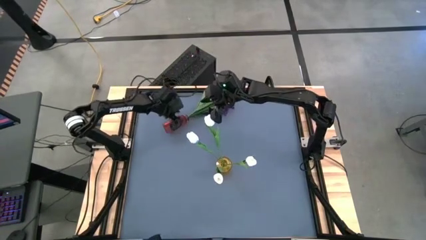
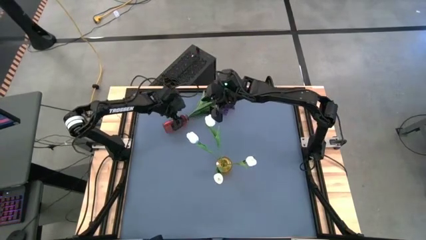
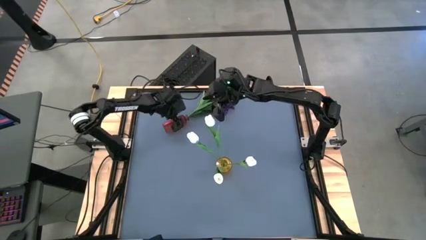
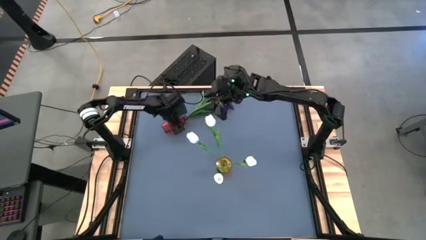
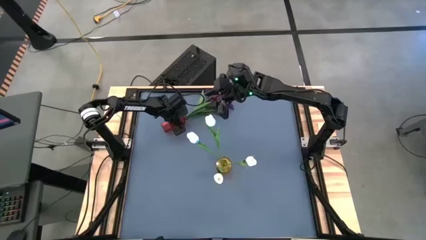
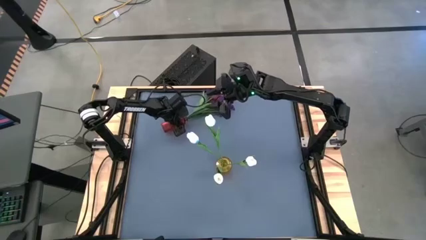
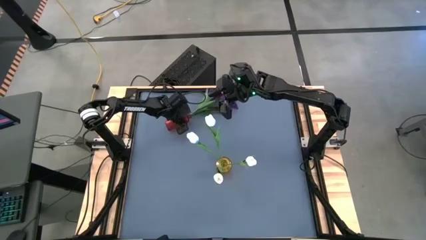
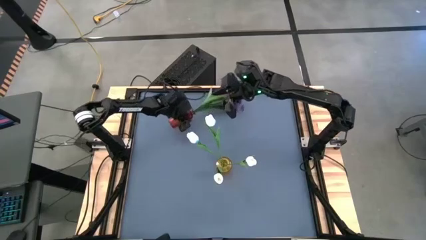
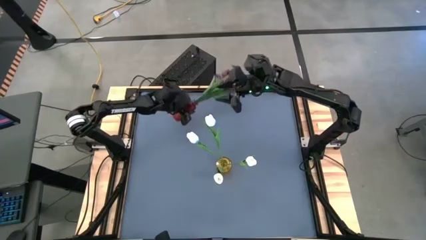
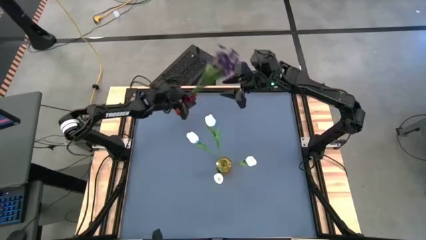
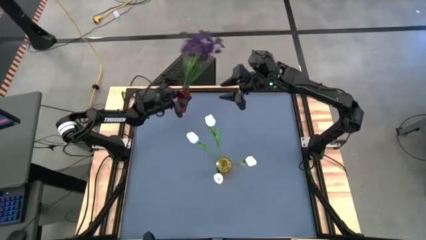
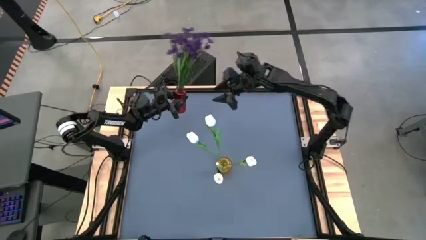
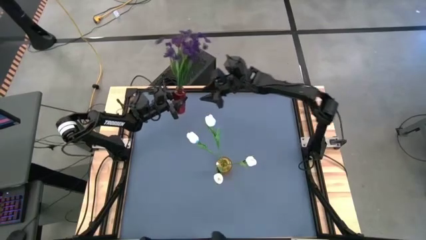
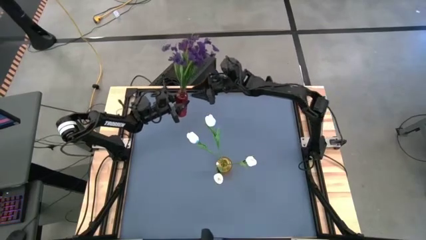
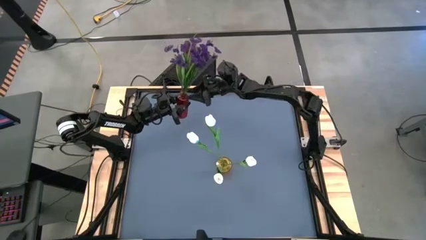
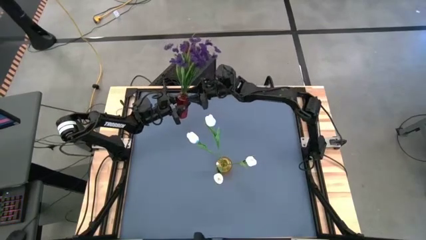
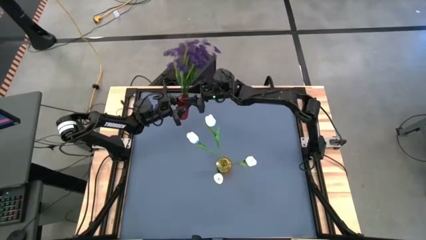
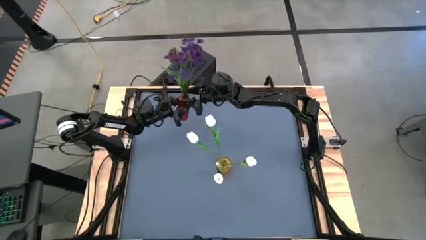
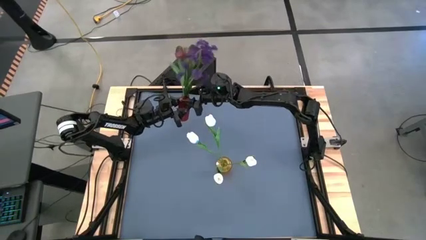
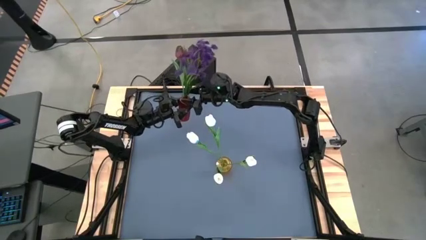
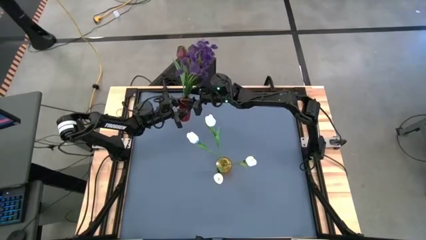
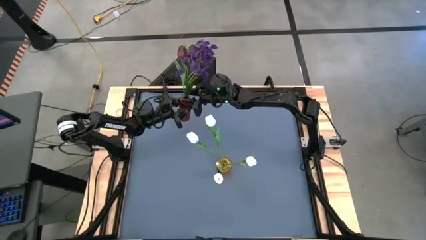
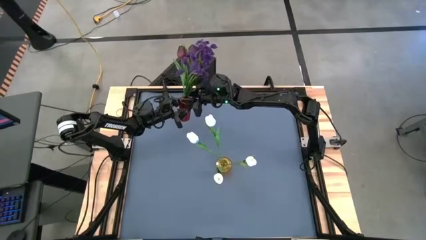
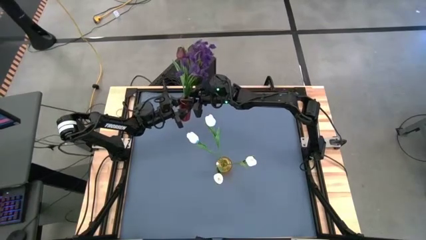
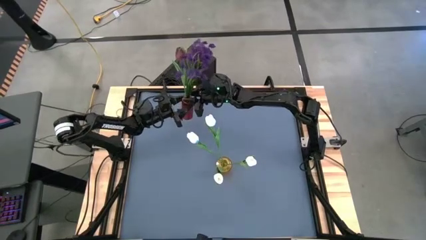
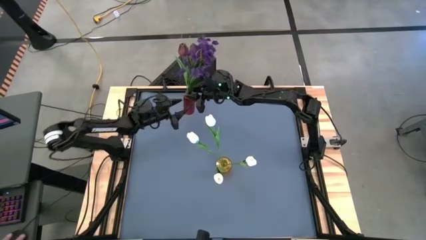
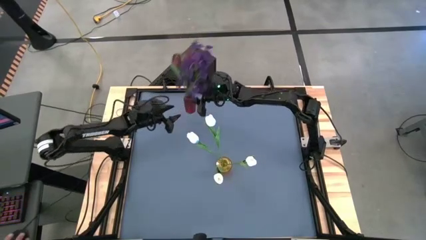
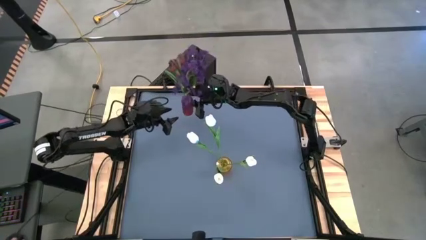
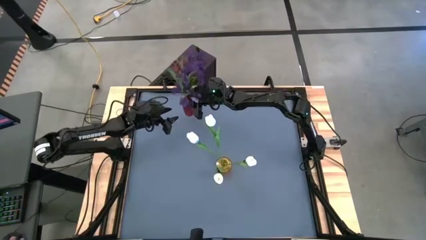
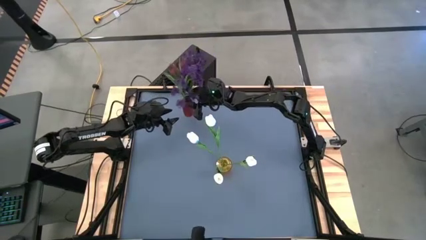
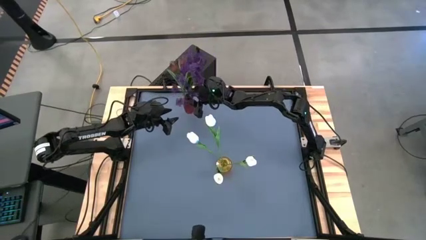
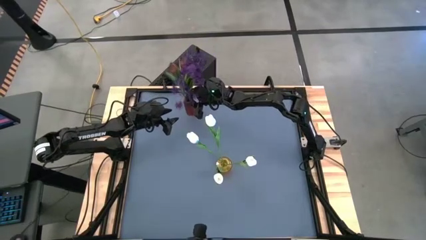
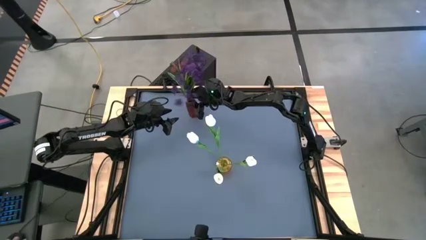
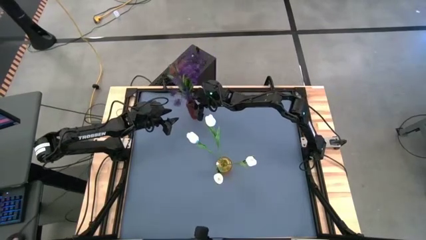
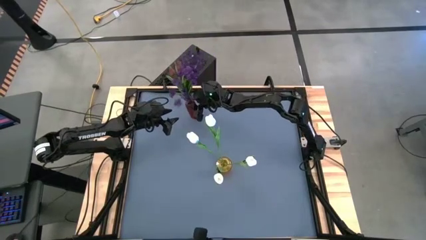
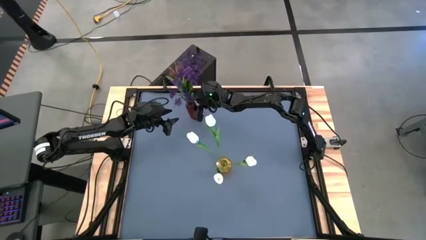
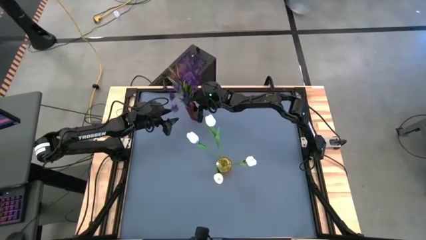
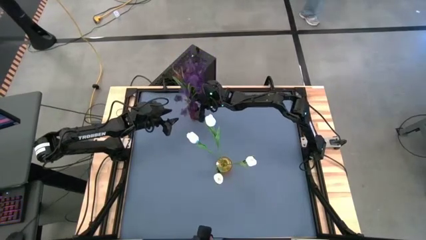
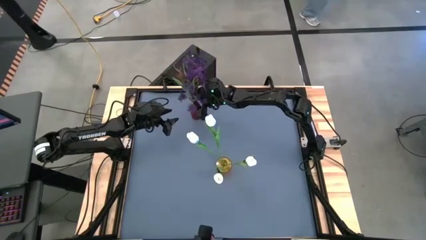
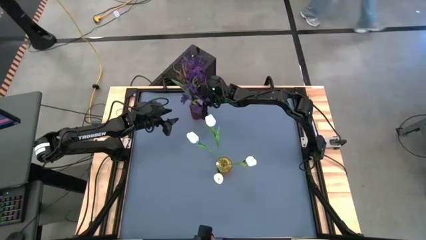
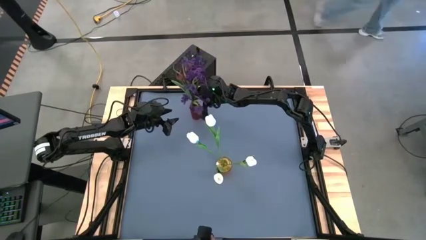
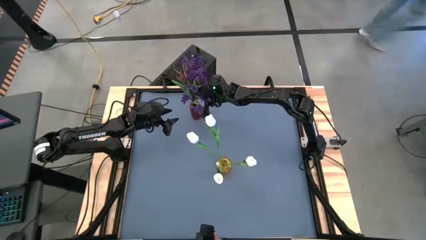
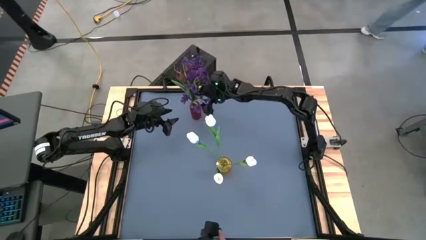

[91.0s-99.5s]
Task: Sort flowers into vase by color
Adjust the red vase

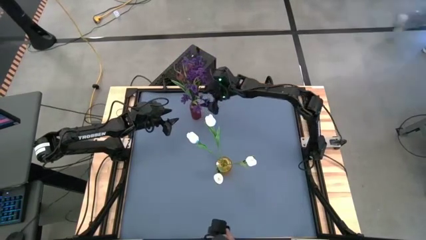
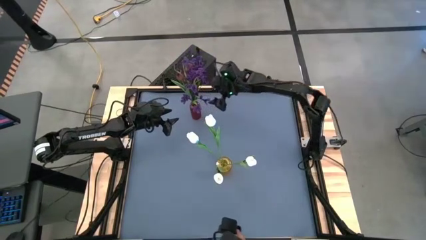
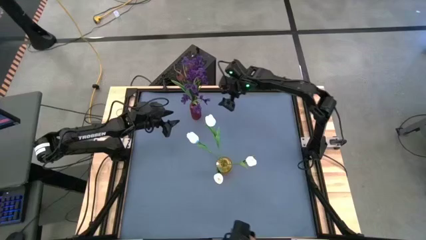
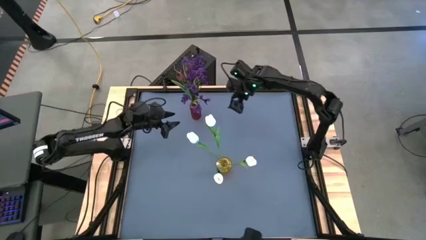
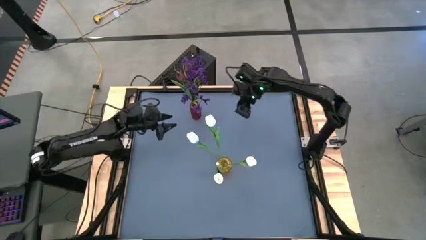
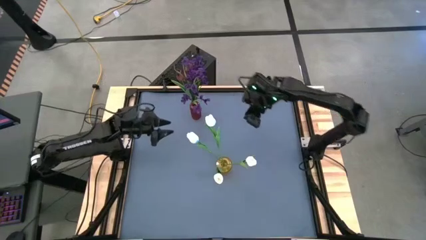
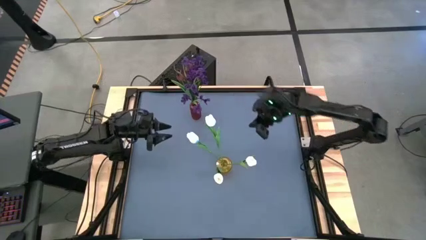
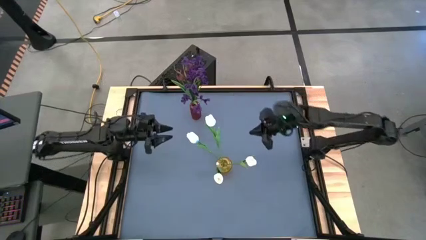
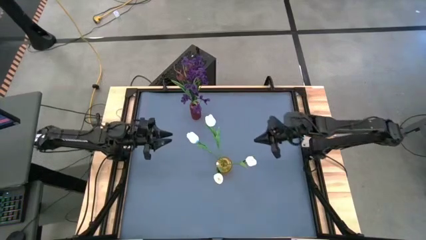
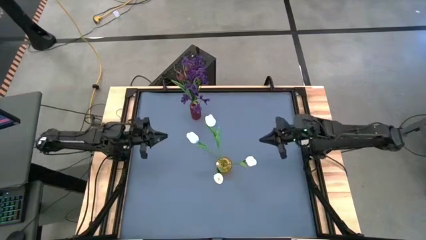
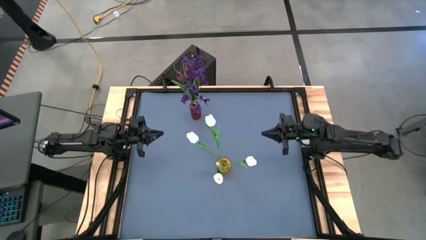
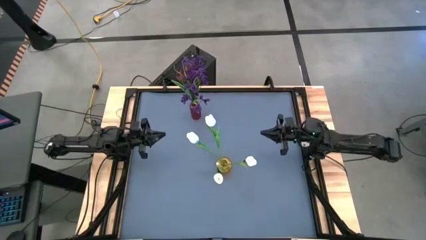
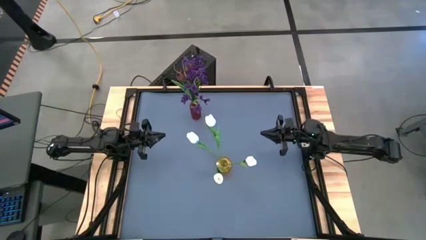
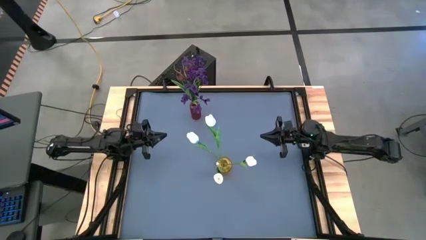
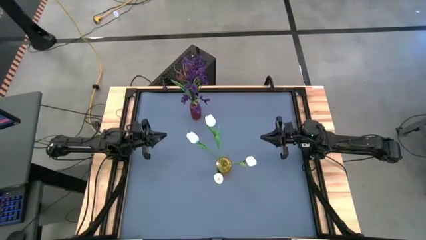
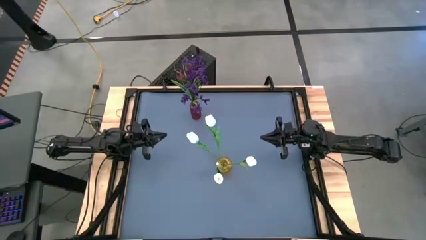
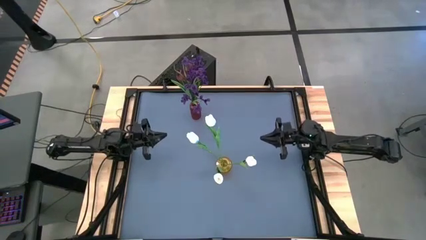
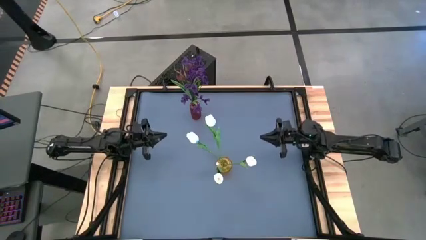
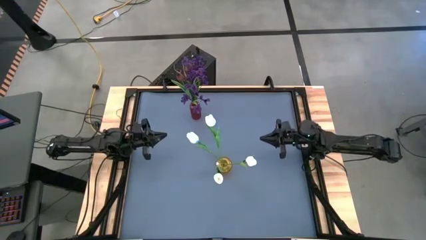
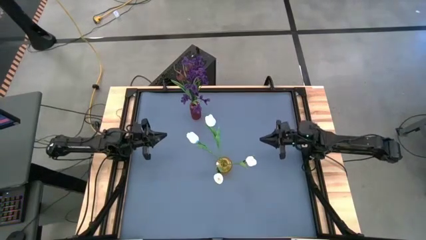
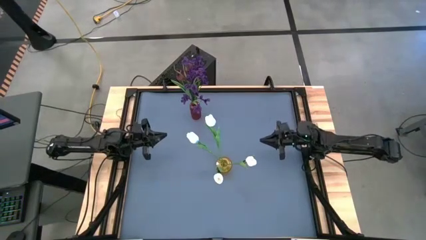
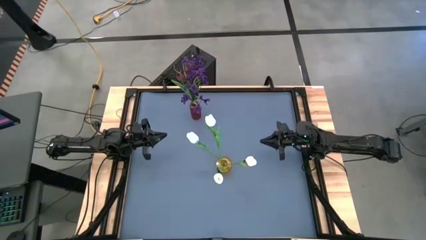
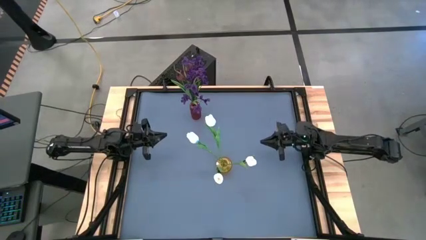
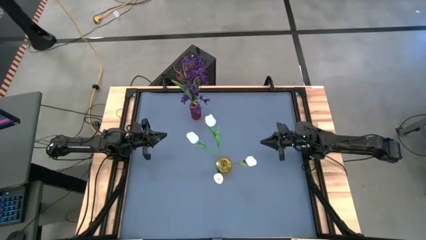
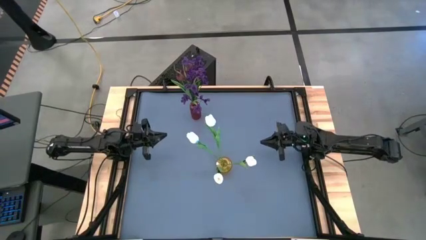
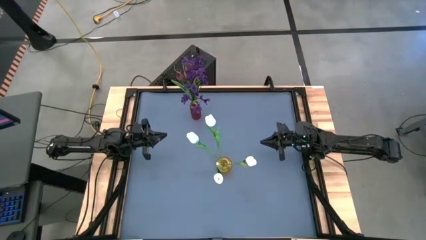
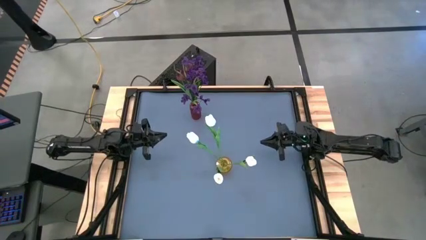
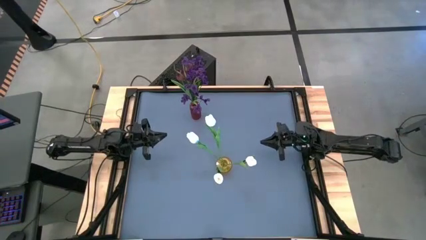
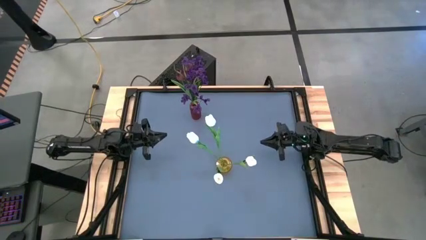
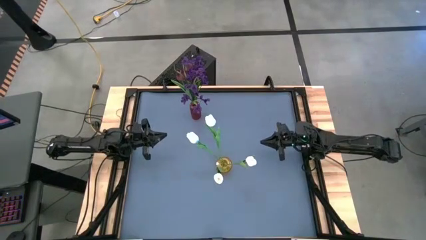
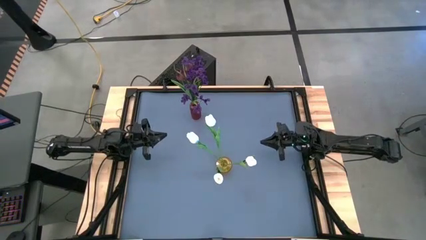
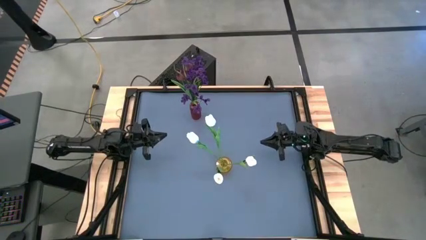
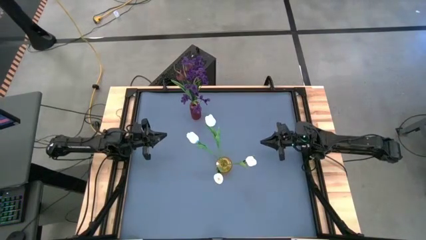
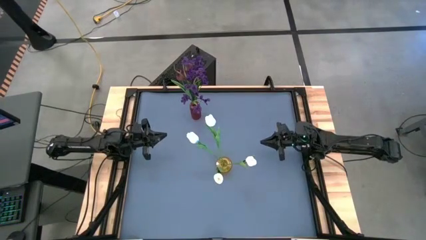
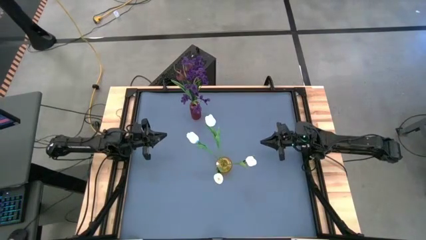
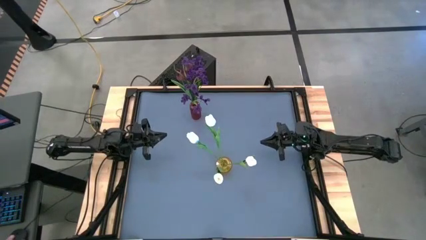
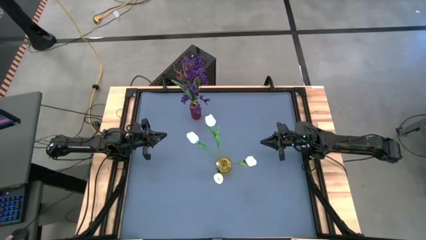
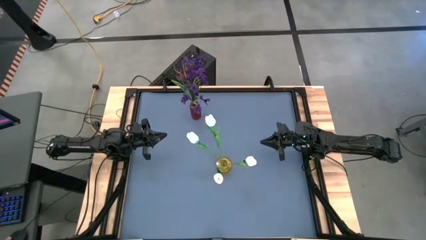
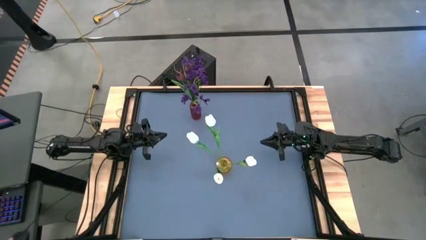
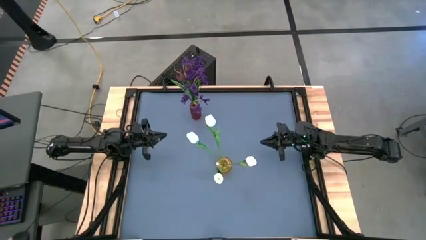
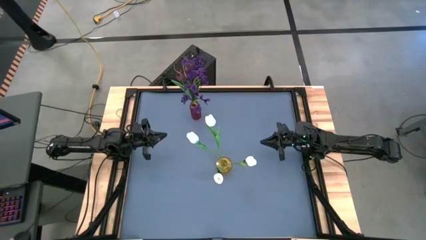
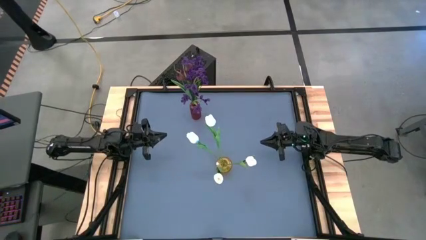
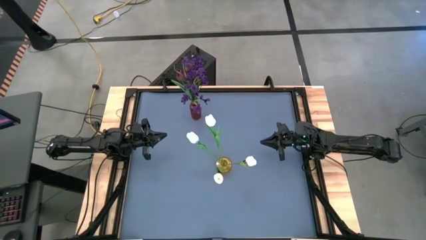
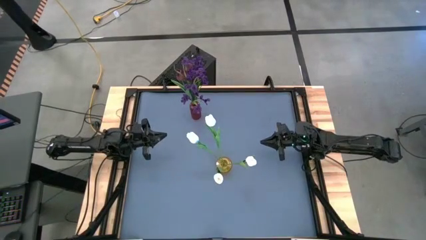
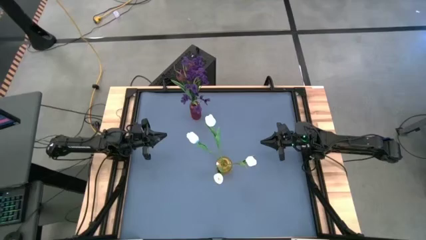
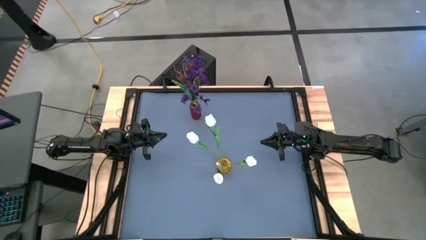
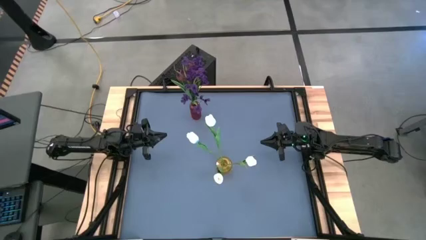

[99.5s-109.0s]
Return to Home Position
